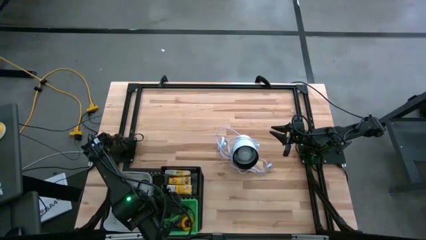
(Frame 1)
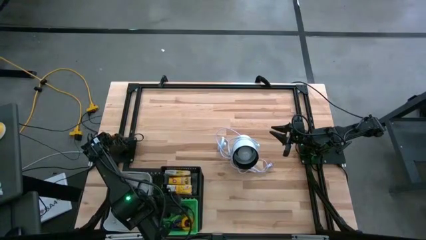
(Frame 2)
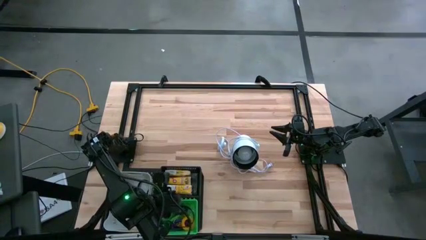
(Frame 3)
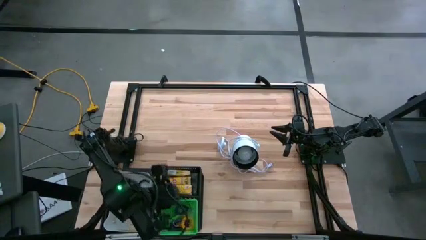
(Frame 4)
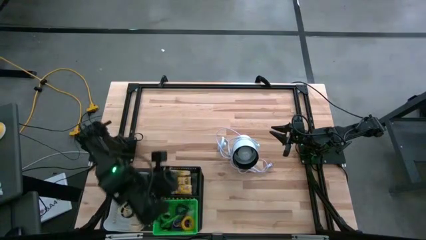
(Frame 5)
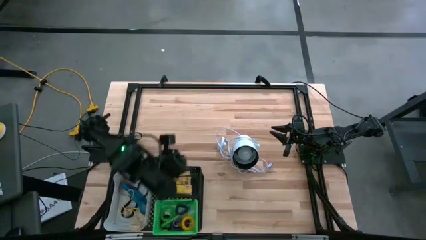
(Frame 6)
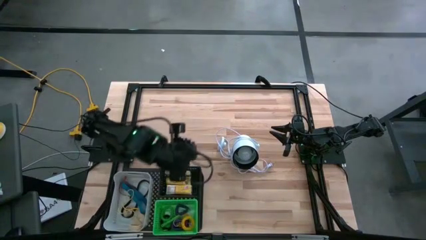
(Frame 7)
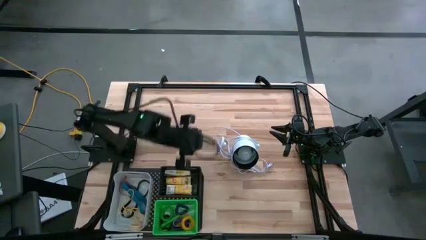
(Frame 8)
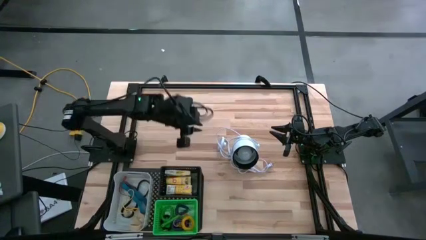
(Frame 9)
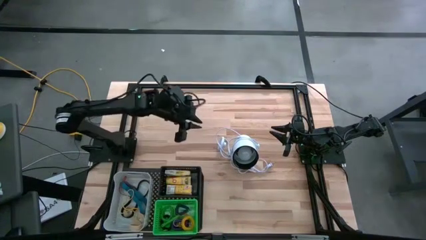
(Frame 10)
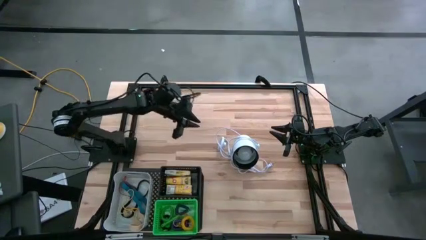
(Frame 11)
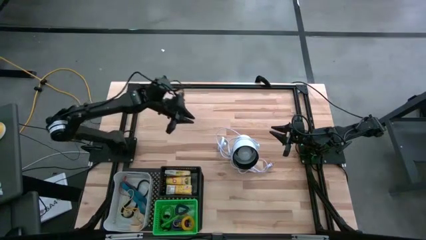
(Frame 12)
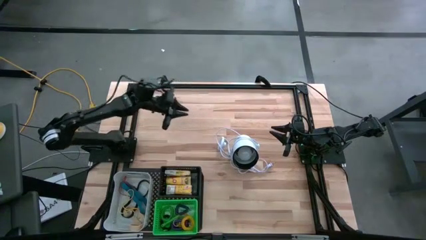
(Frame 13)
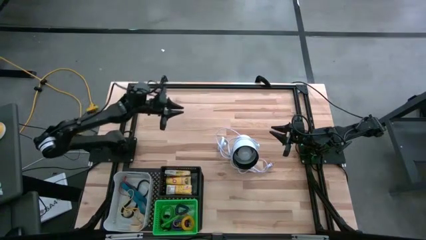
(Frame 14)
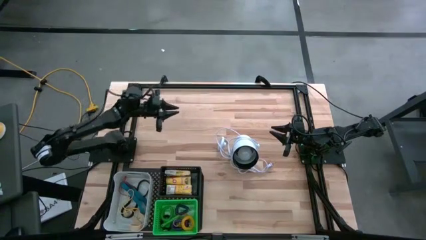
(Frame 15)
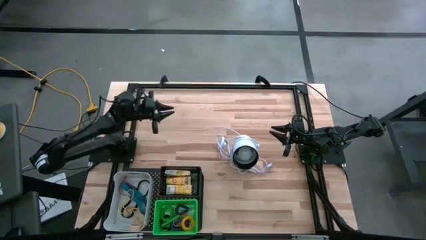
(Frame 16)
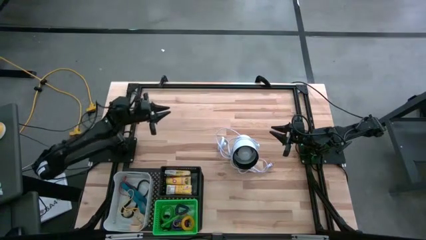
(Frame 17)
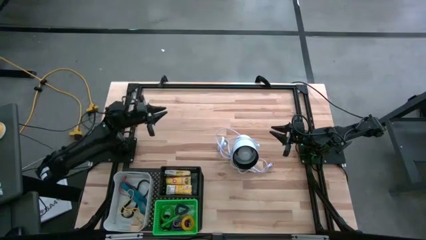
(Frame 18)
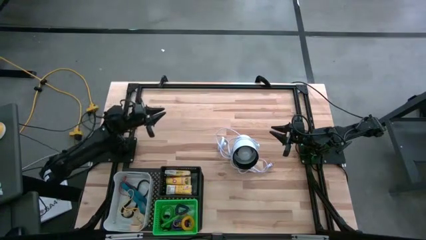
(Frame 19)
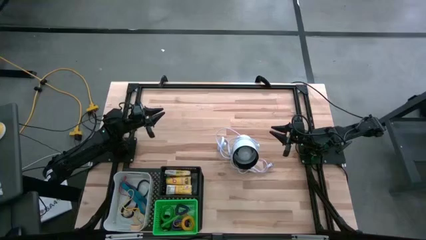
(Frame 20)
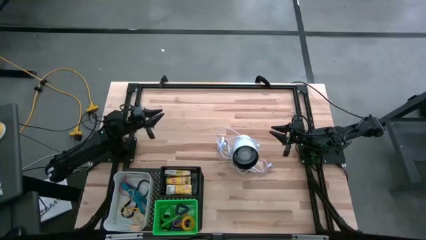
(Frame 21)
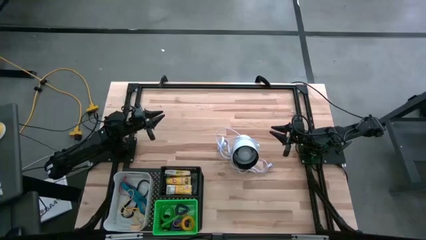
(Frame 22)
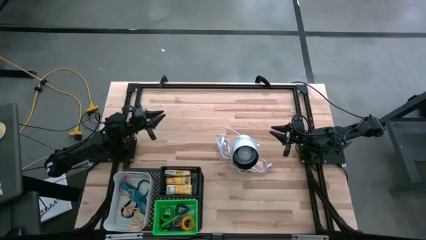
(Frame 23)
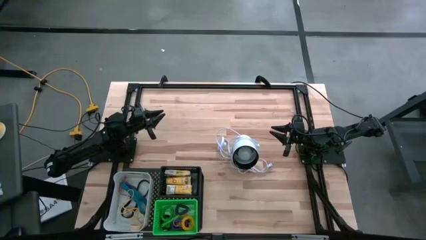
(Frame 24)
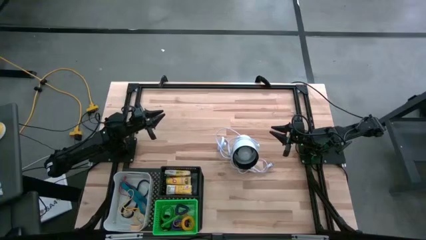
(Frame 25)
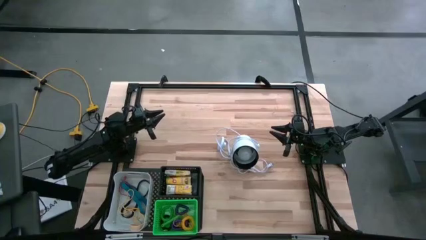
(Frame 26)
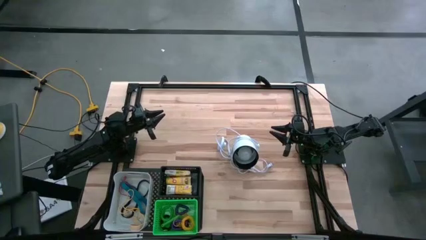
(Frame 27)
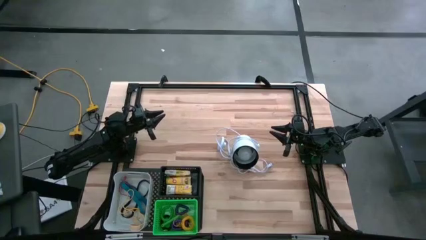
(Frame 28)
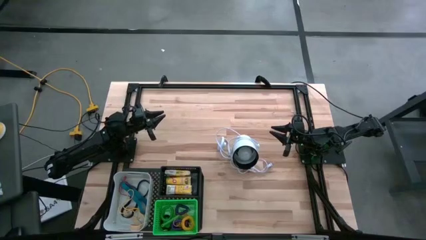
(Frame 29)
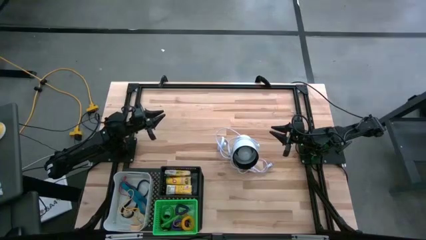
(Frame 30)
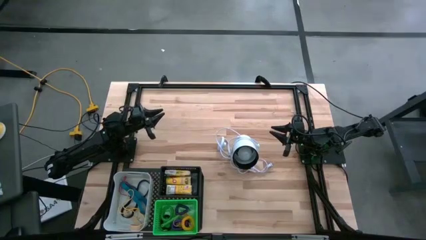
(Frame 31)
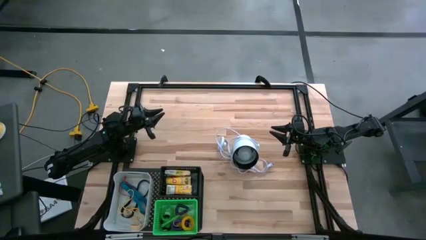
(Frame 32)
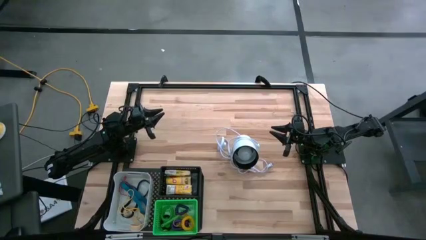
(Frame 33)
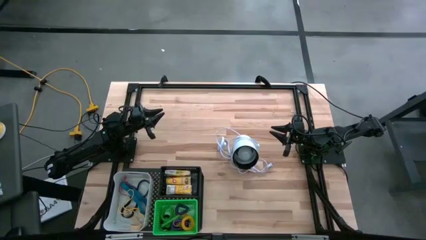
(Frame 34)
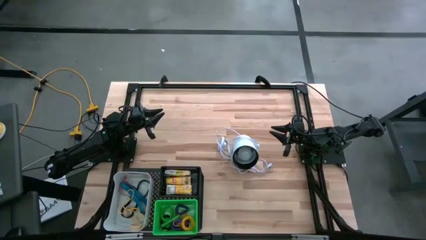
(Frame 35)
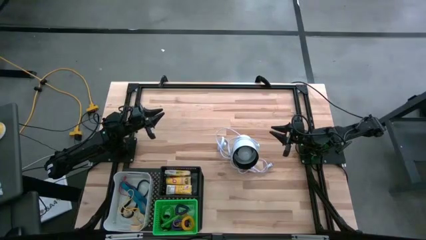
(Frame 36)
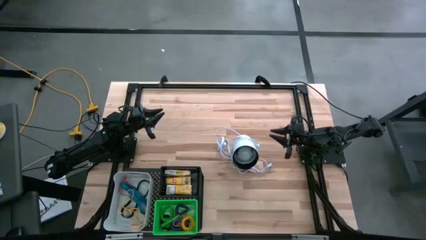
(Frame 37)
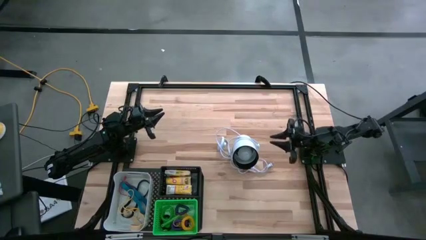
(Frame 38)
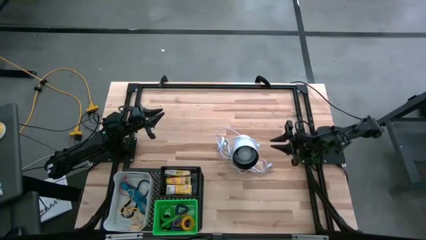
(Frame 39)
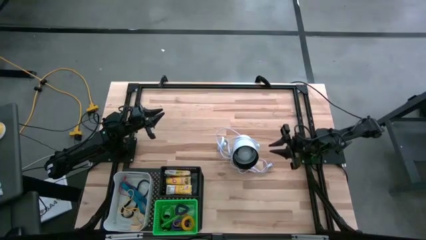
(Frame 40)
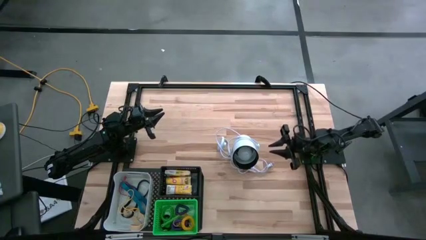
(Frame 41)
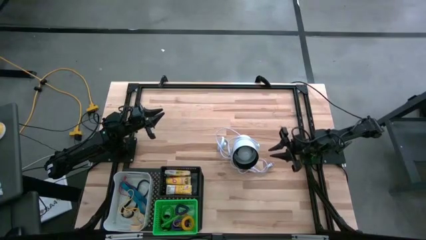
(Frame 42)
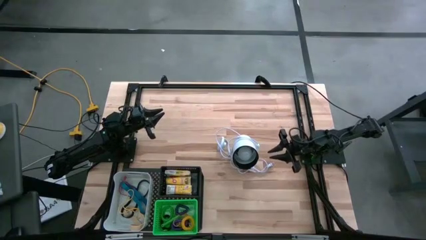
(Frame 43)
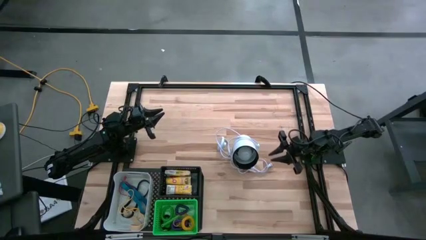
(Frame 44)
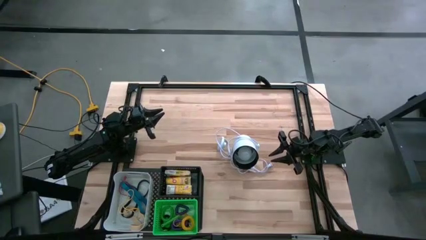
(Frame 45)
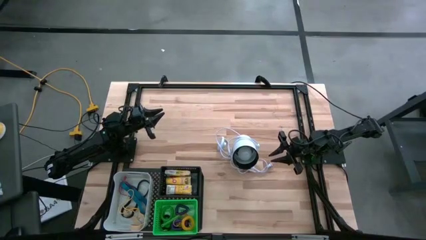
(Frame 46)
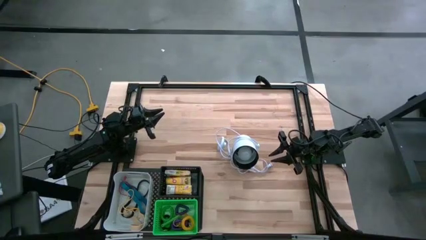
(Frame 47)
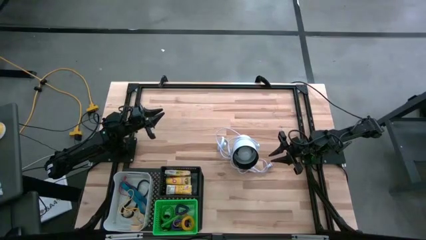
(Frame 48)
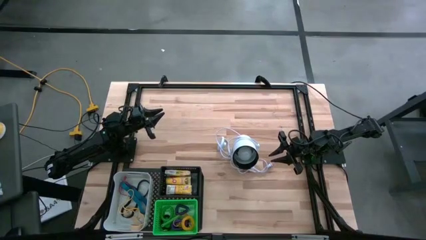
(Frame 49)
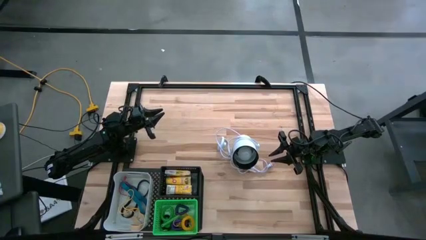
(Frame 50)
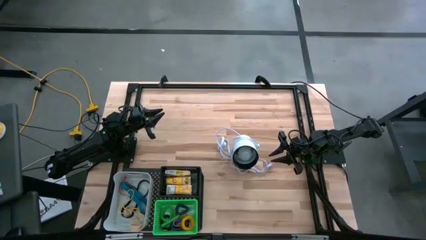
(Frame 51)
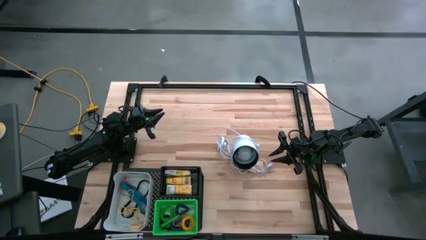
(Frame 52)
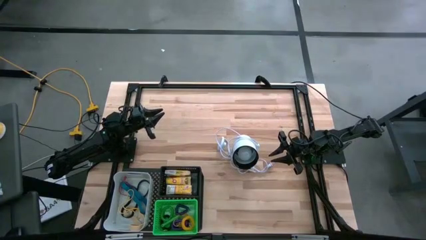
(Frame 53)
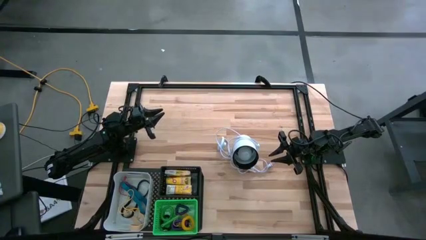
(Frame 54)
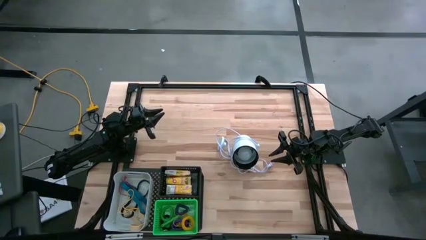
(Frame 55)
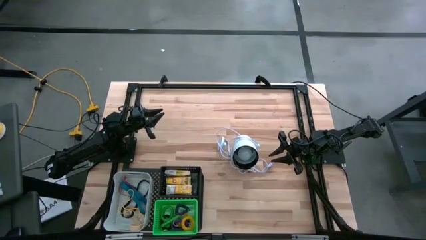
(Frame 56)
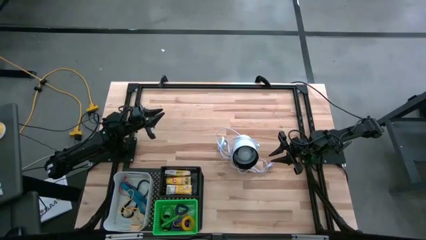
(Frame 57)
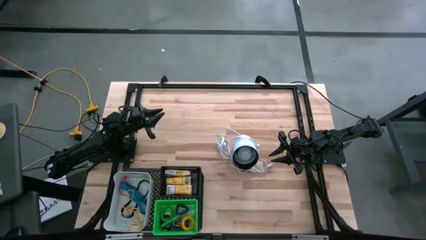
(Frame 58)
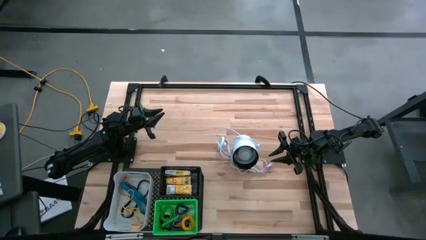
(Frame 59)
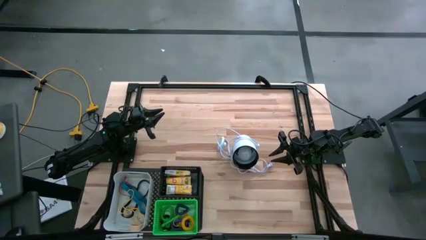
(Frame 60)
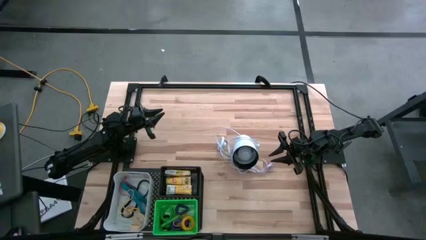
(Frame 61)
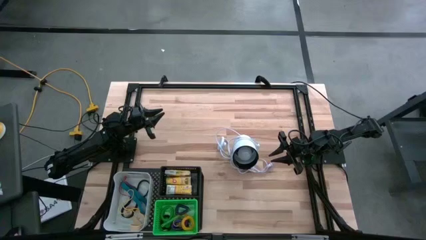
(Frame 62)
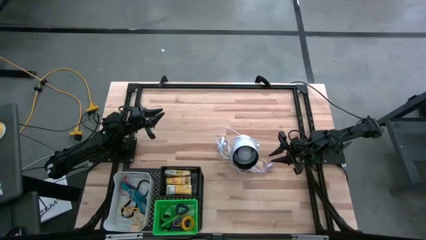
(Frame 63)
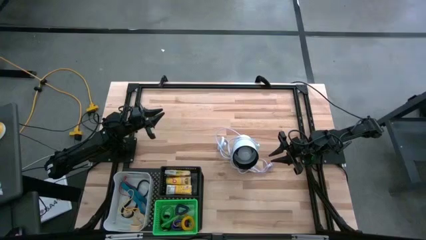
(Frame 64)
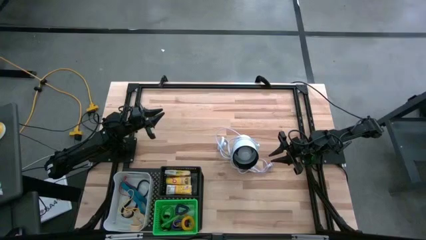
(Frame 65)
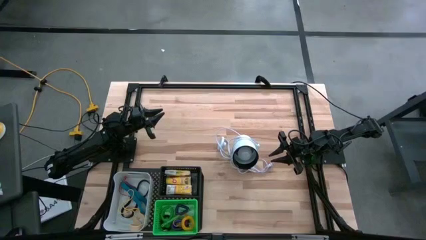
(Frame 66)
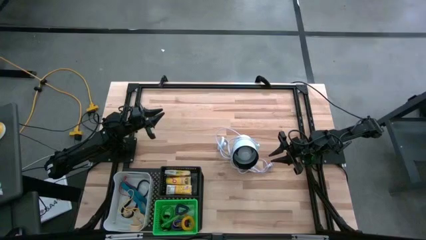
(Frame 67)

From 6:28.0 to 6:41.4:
Task: Pick & Place Office Desk Supplies
Return to Home Position

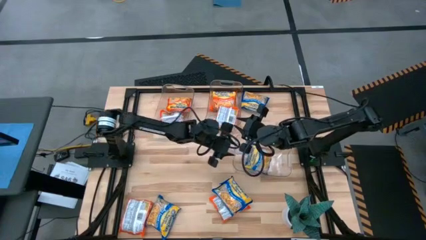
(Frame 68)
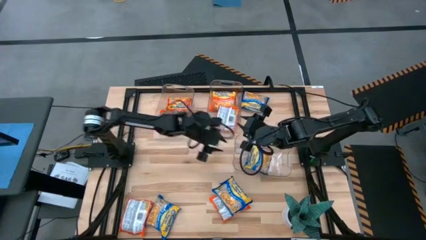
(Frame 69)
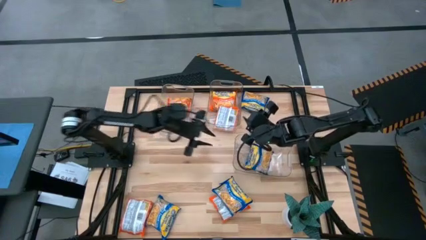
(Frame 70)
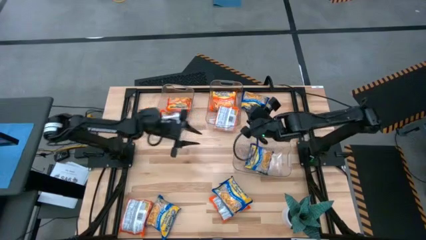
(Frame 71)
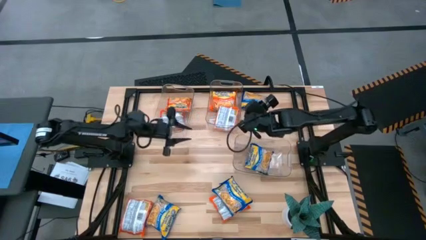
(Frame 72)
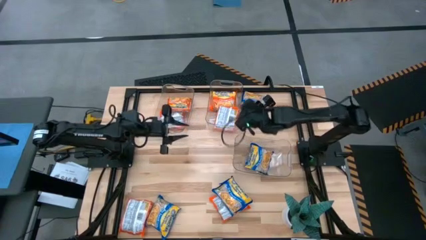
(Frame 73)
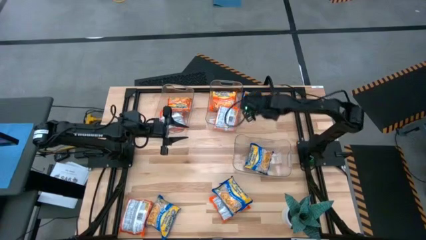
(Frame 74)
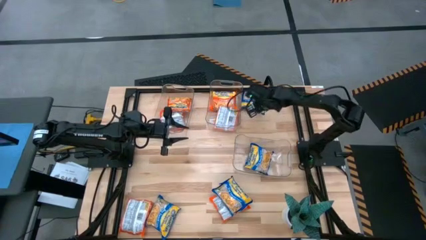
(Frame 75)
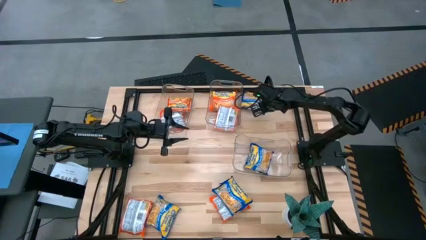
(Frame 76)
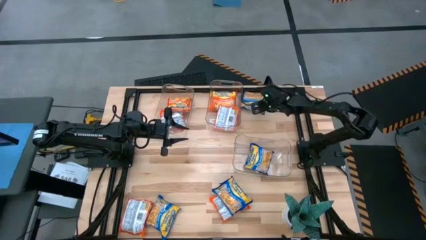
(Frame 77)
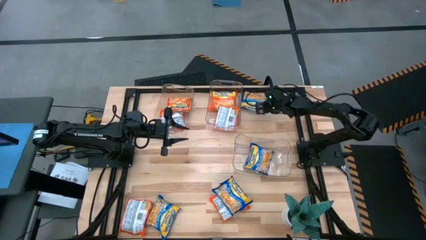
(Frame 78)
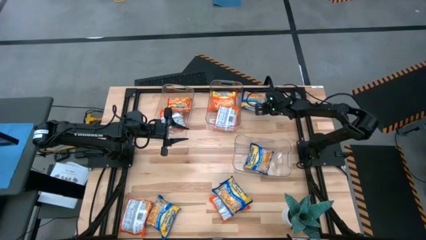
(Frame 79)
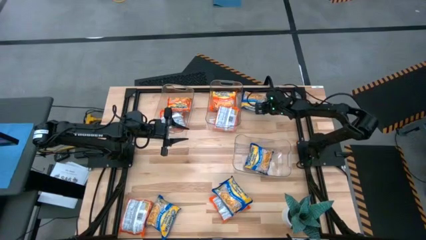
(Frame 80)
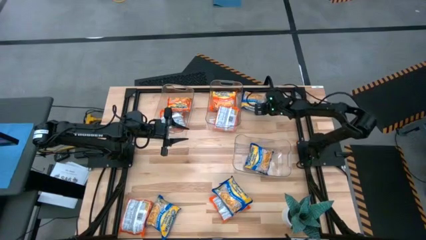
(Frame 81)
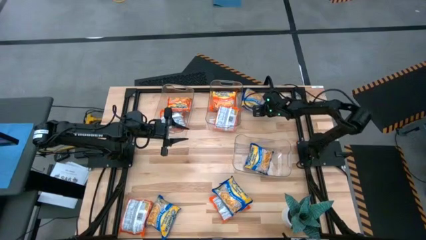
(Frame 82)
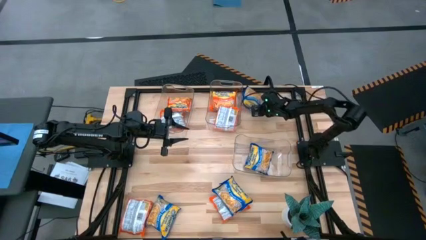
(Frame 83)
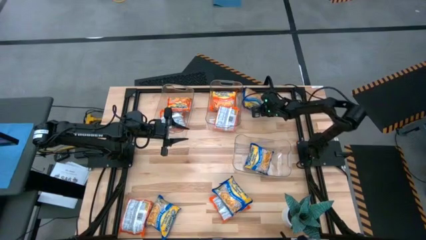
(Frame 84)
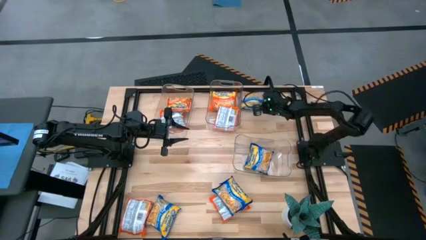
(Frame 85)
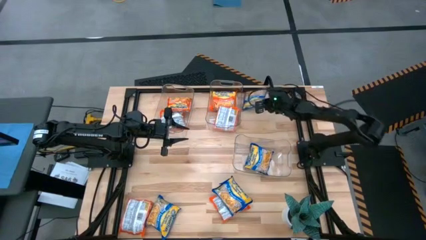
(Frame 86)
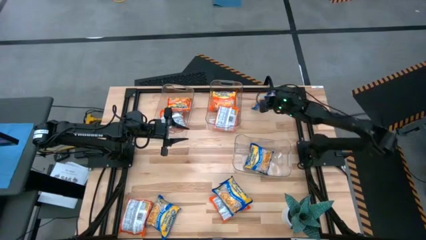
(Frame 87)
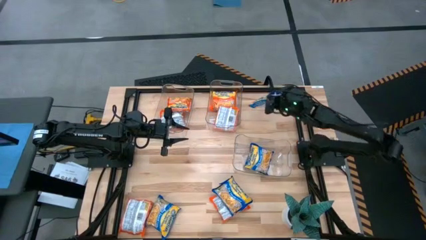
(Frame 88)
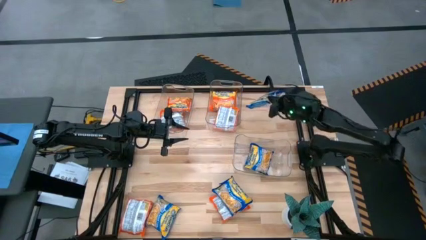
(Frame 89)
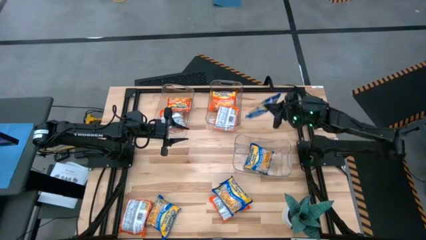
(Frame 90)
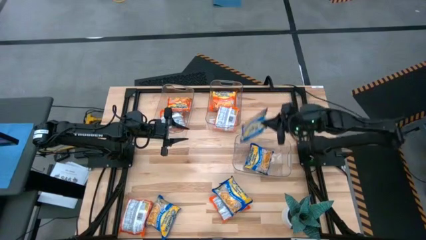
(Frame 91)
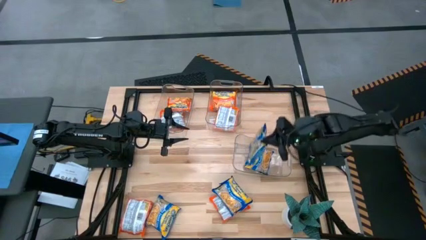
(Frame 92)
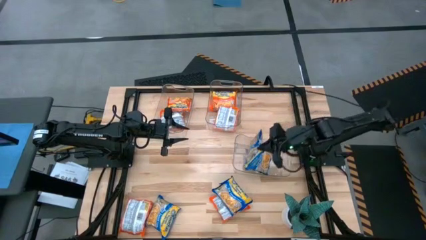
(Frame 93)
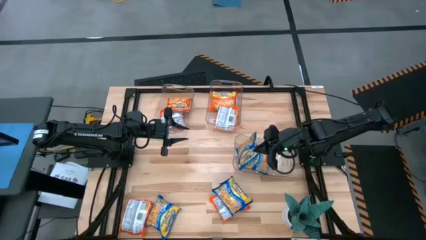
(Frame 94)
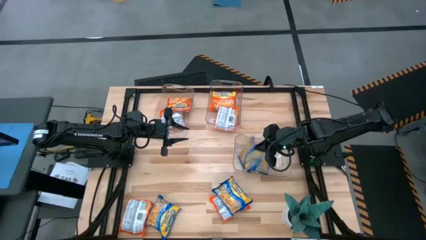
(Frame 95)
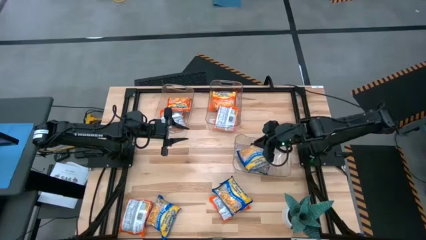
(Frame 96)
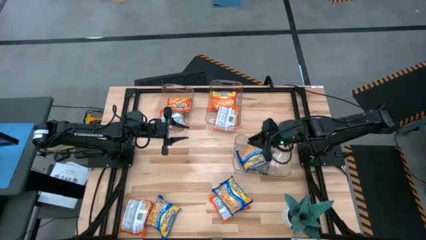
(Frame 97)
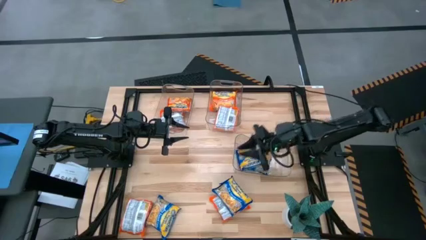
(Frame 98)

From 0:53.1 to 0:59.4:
Task: Sort Maruchan noodles
Put the blue bag into the right transparent bin
